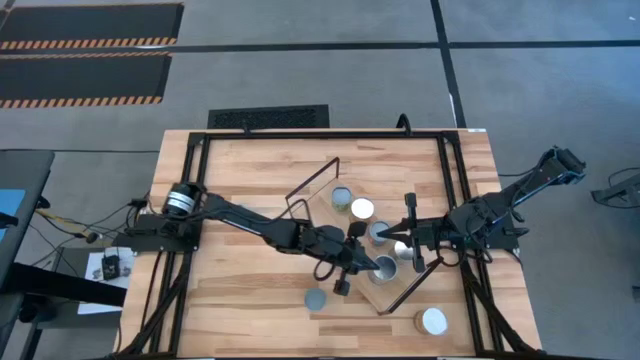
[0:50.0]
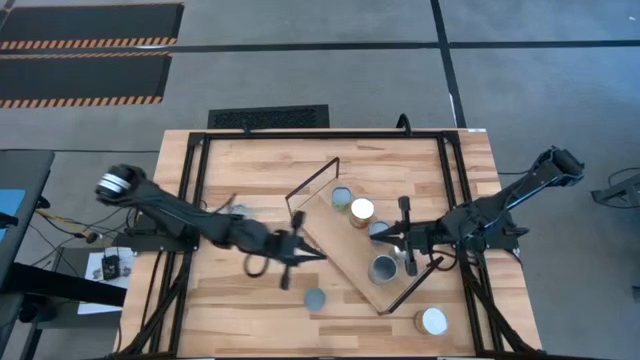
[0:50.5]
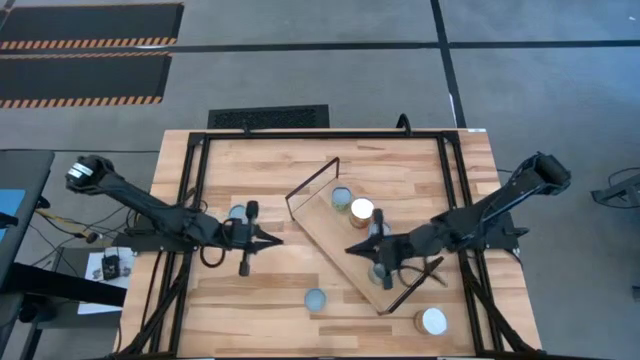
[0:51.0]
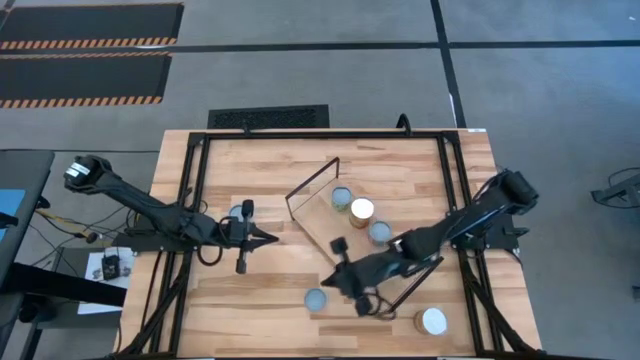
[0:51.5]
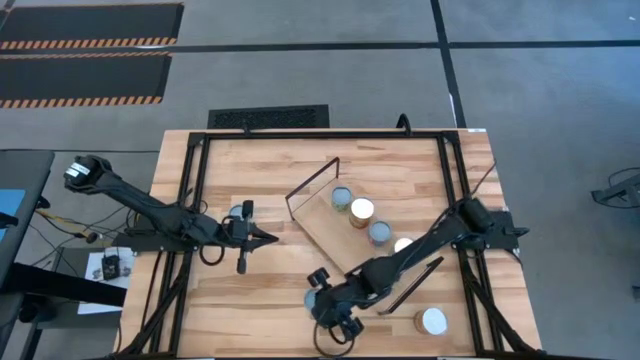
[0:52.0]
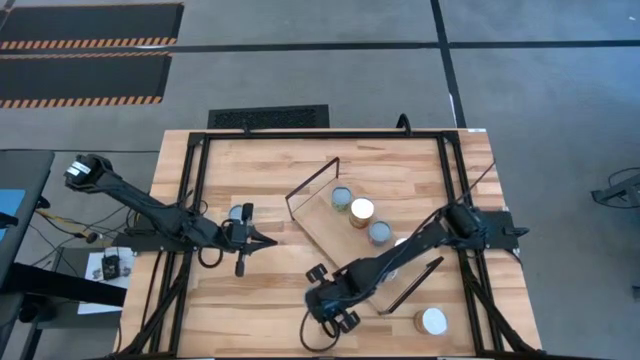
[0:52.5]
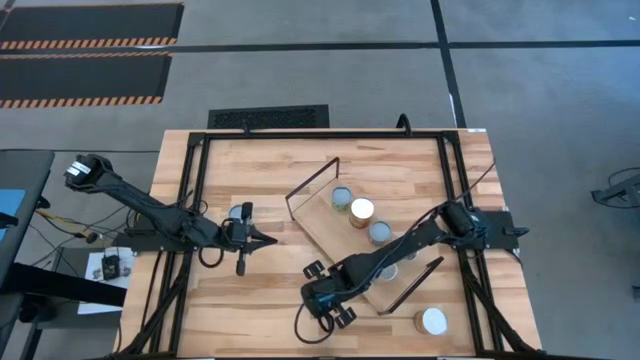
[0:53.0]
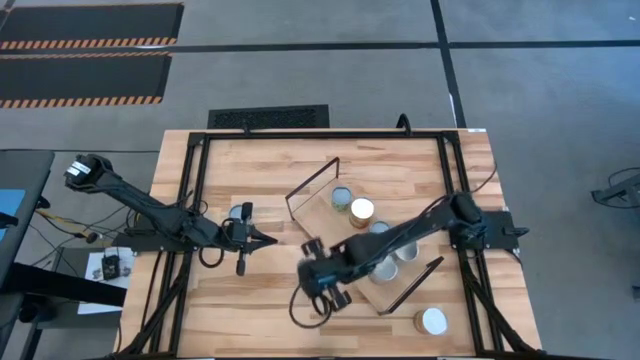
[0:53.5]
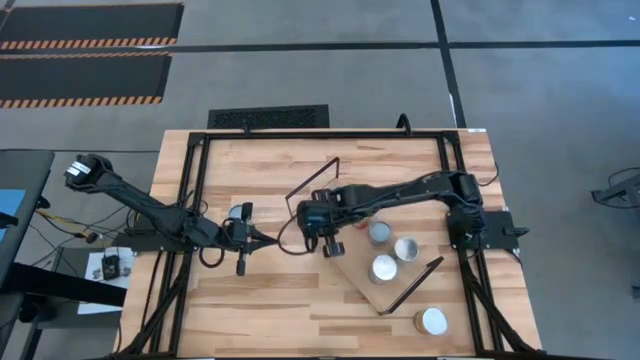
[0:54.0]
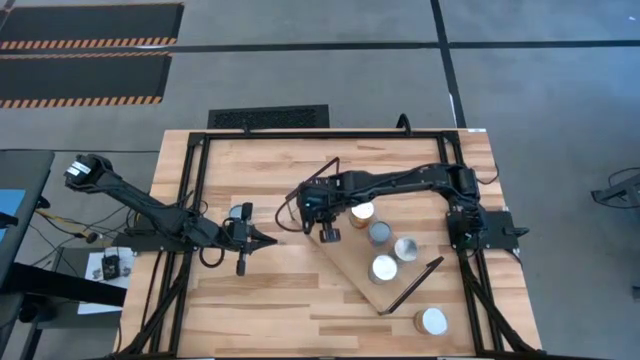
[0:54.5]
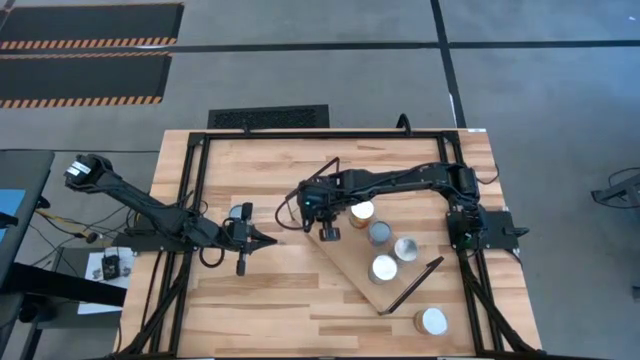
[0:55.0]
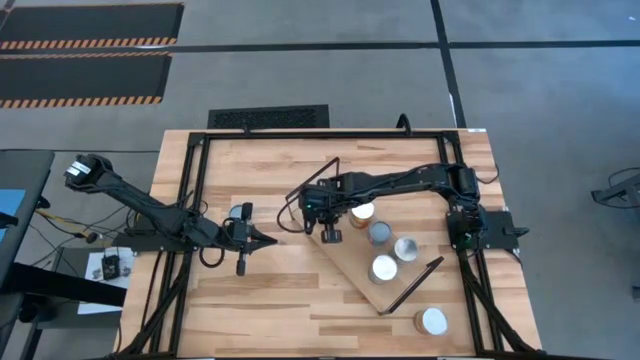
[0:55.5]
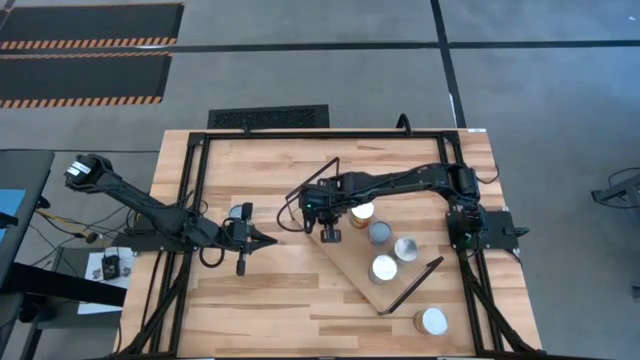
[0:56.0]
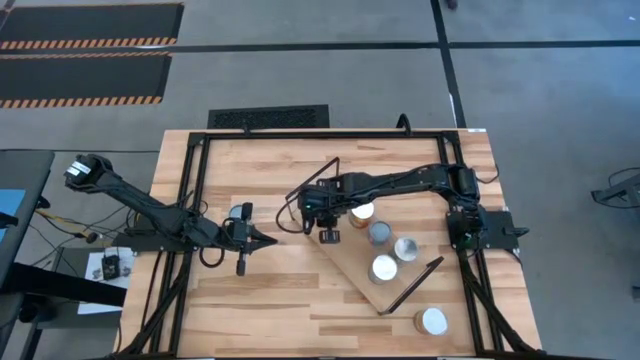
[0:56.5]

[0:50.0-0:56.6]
Task: Pick and place cans onto a shelf
Put the small canned oranges on the shelf

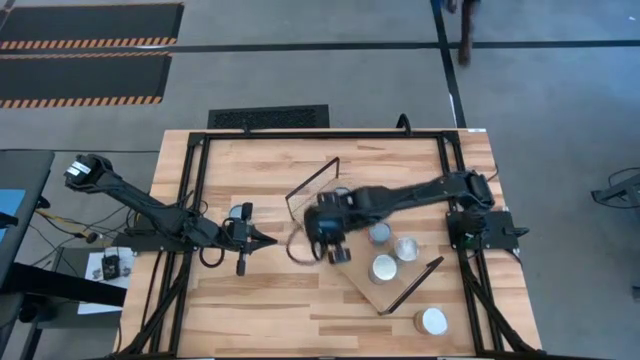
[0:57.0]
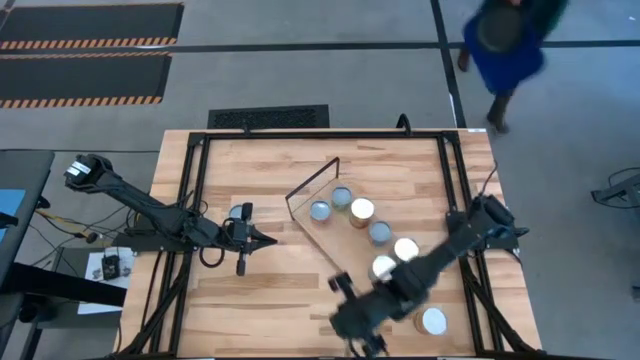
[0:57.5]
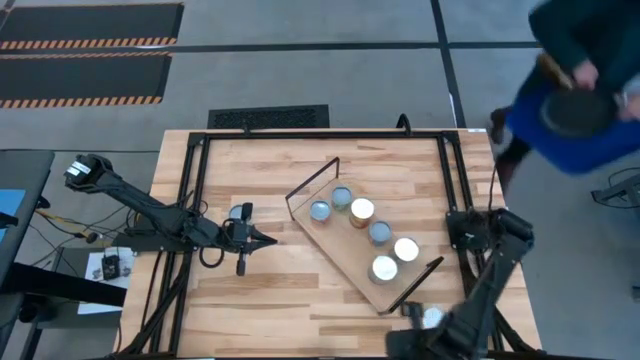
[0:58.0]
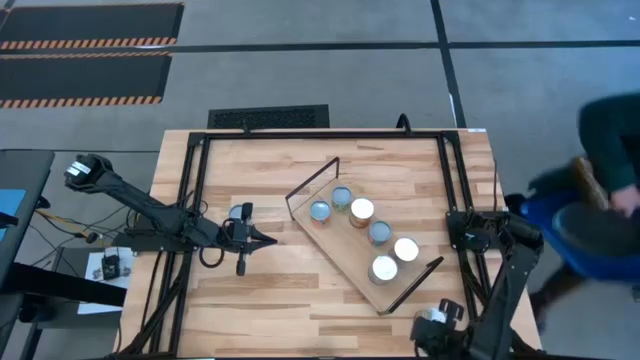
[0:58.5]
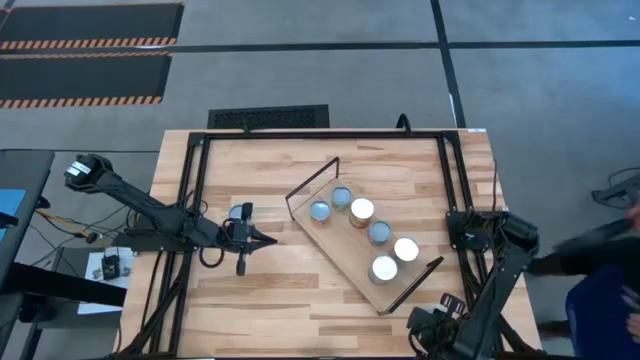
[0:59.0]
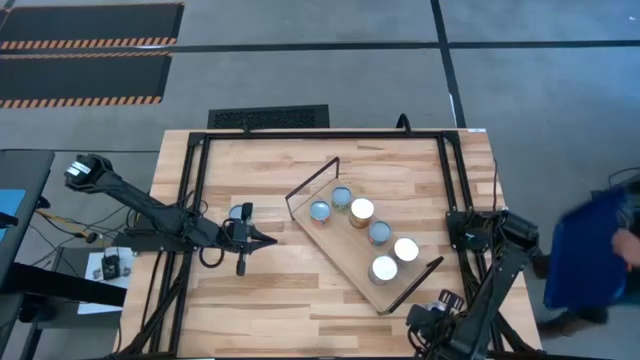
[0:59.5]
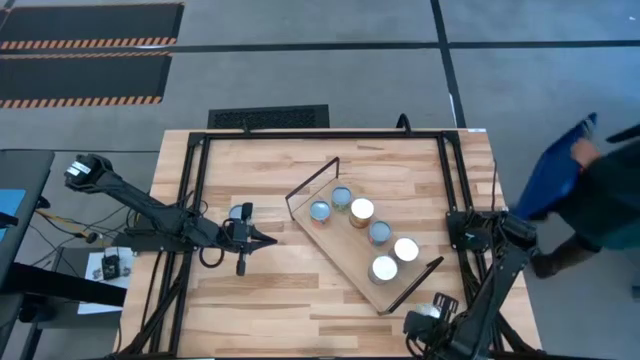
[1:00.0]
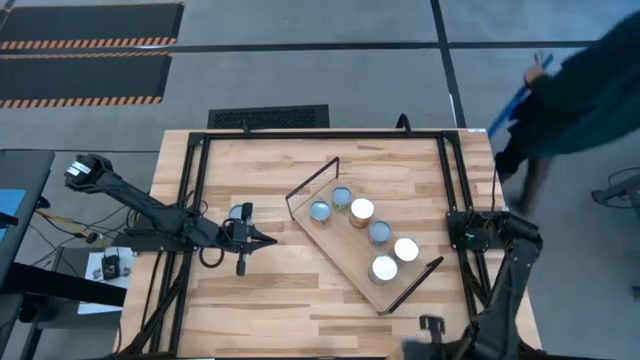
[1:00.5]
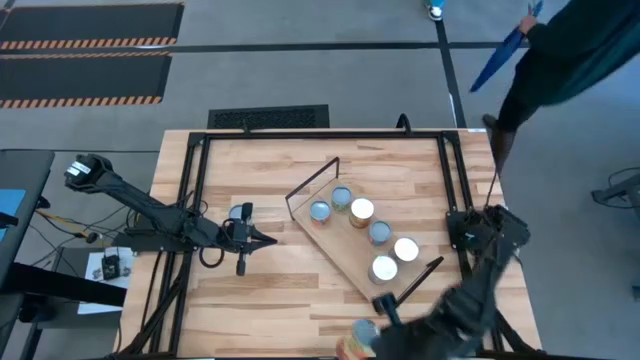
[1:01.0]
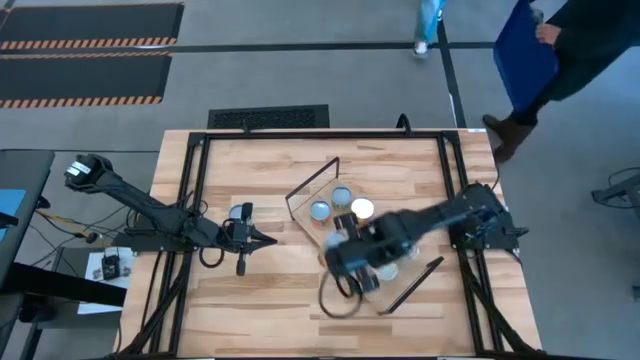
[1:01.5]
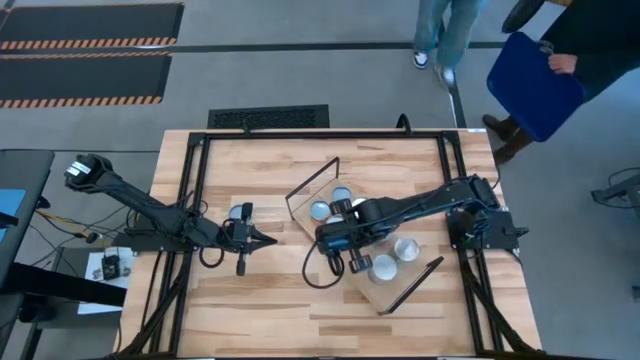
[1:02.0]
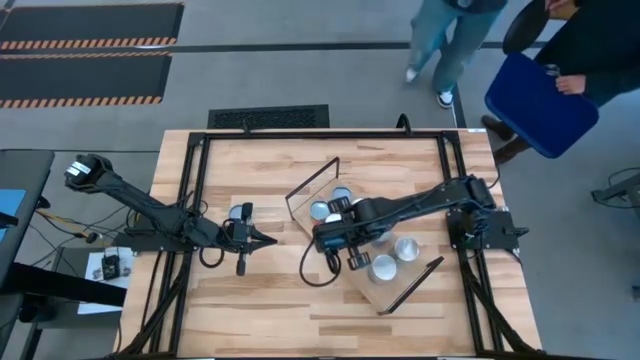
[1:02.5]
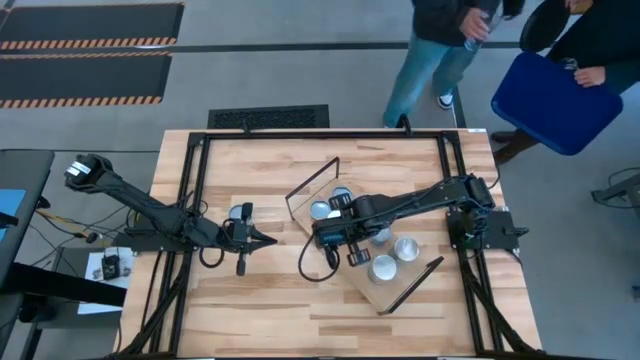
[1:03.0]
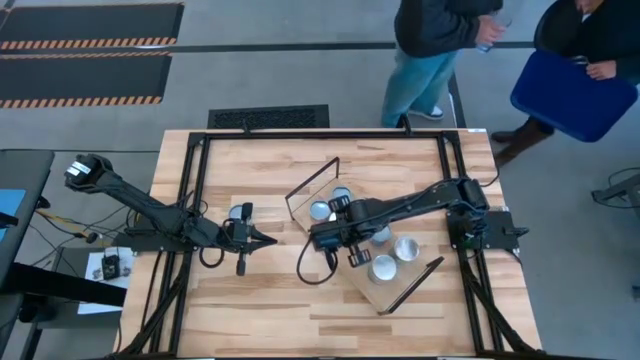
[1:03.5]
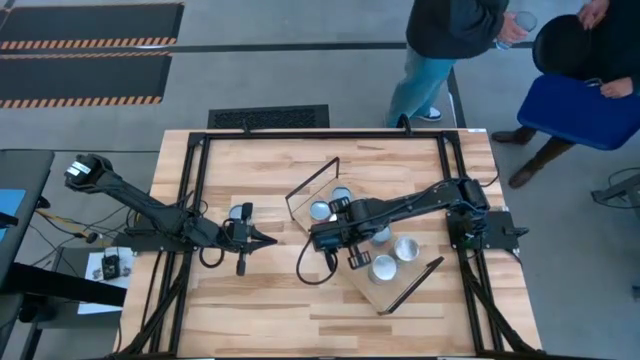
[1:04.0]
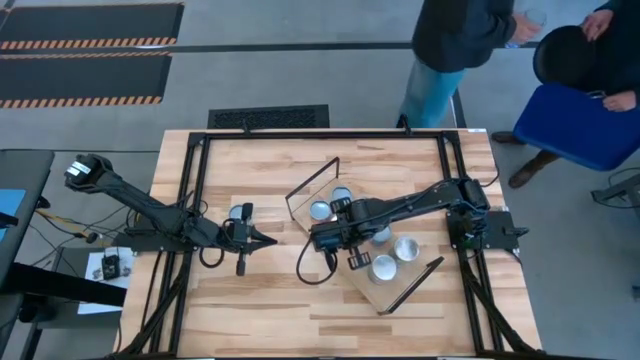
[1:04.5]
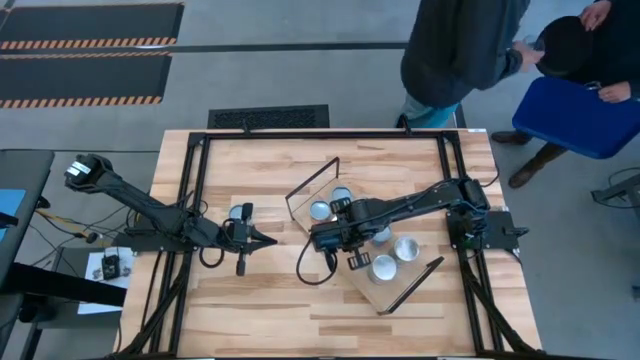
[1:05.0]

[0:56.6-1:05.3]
Put the large canned corn aligned with the other large canned corn on the shelf

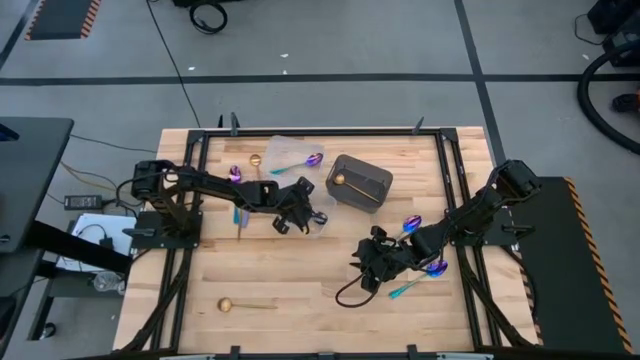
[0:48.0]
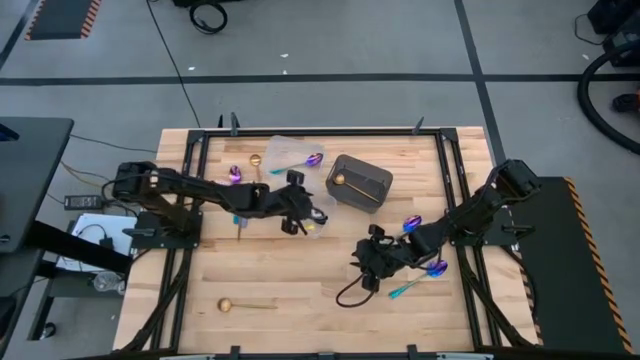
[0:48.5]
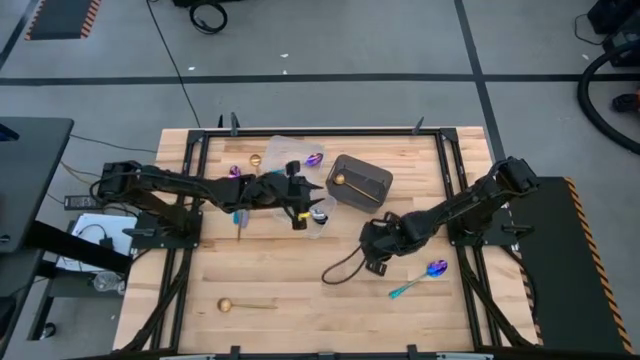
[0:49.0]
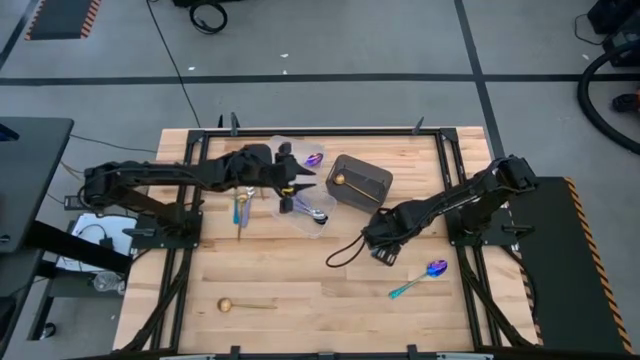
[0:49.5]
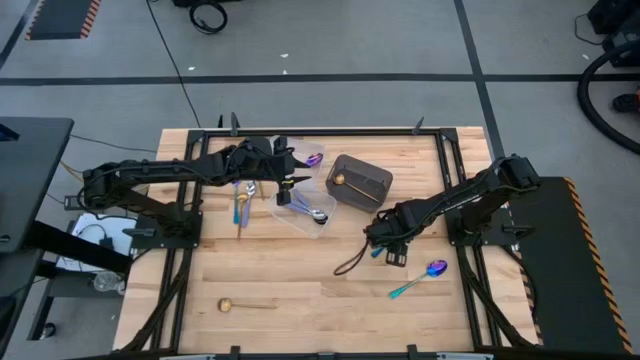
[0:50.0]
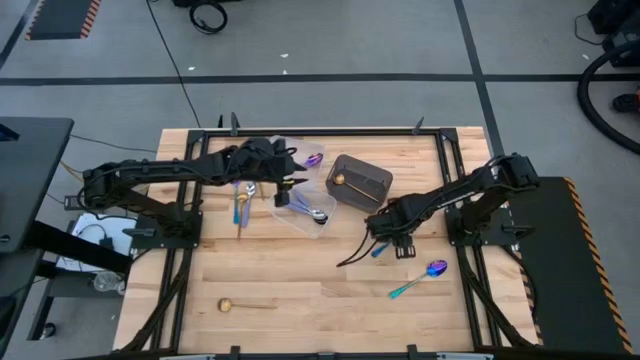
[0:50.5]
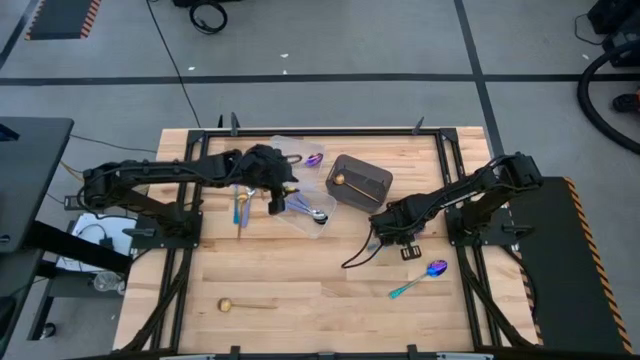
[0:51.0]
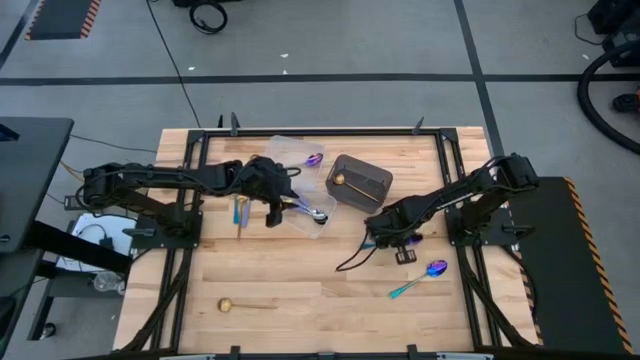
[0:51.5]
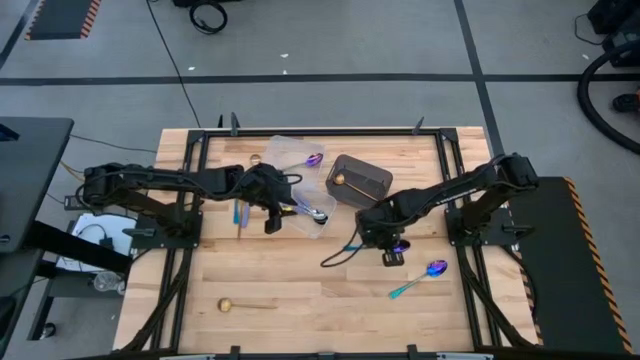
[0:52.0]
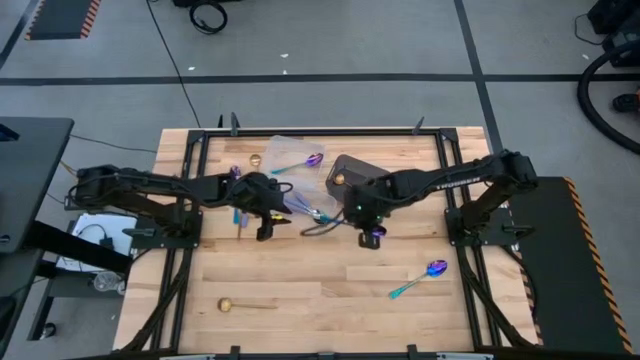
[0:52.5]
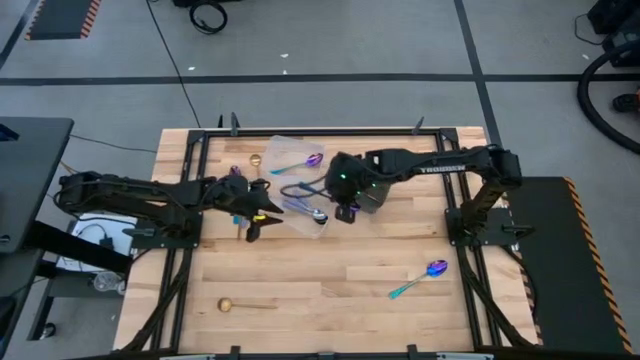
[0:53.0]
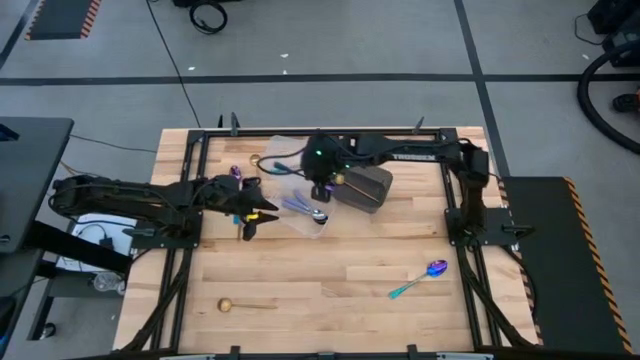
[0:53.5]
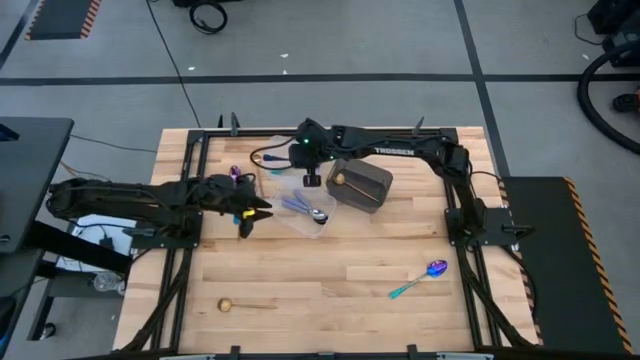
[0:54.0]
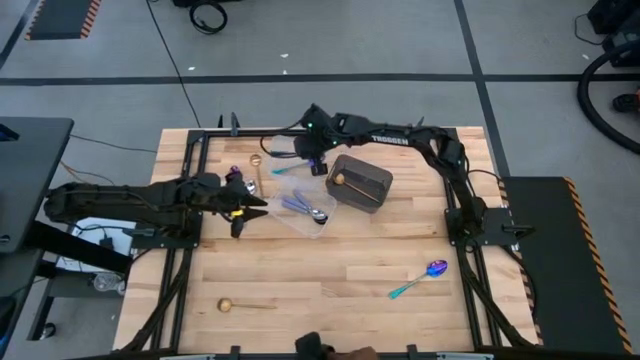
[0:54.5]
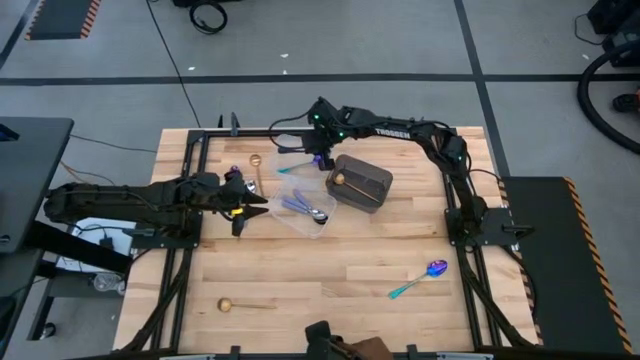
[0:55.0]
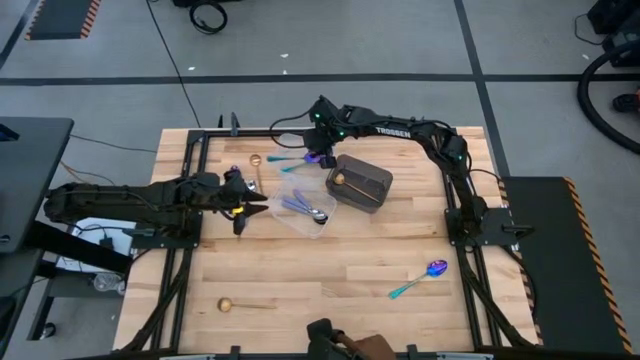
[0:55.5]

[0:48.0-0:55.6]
Task: Sort silverware by color (type)
Put the blue spoon into the top transparent bin
